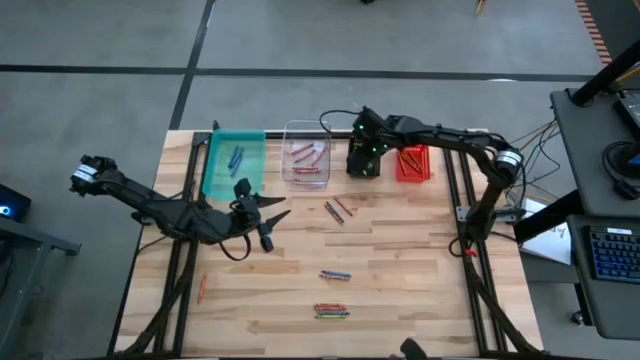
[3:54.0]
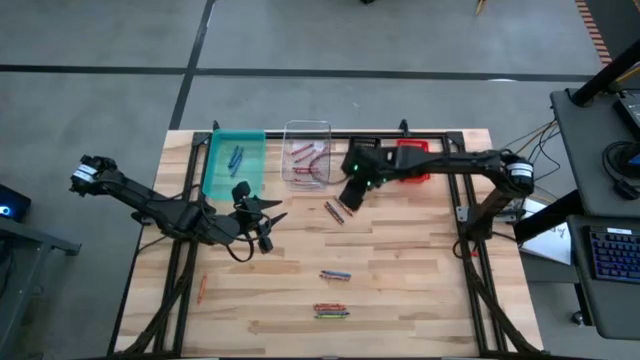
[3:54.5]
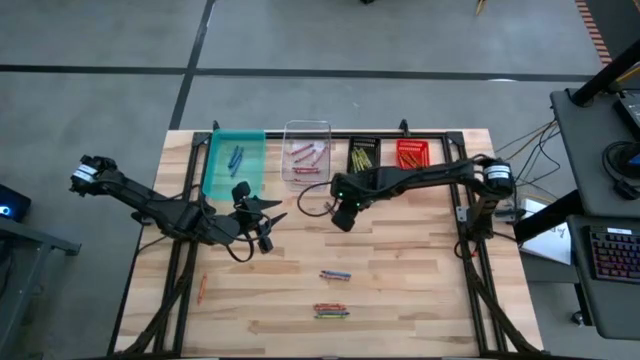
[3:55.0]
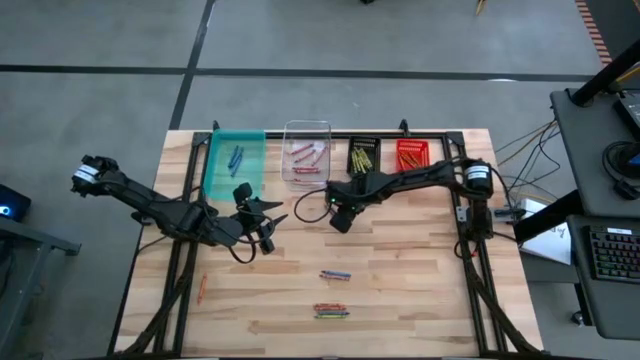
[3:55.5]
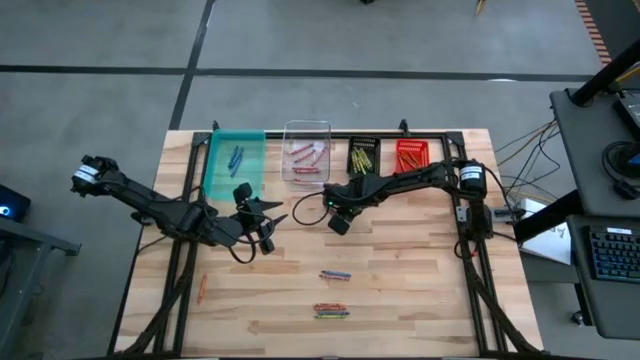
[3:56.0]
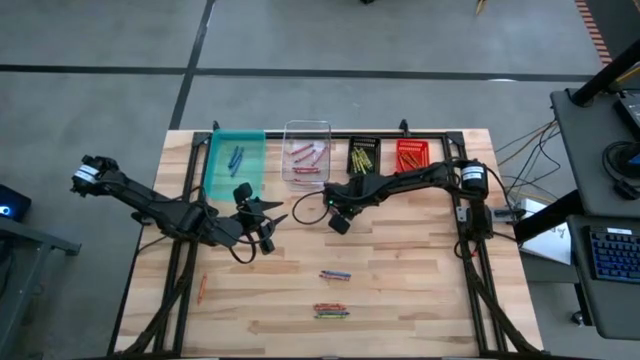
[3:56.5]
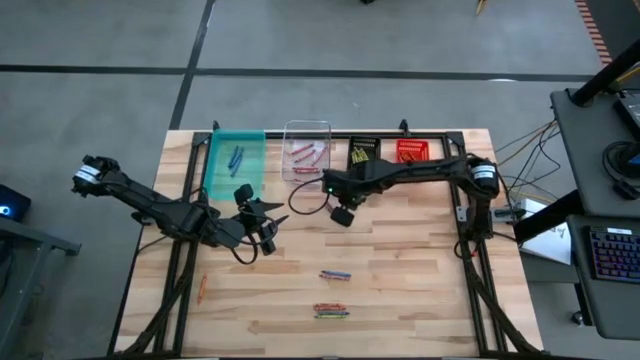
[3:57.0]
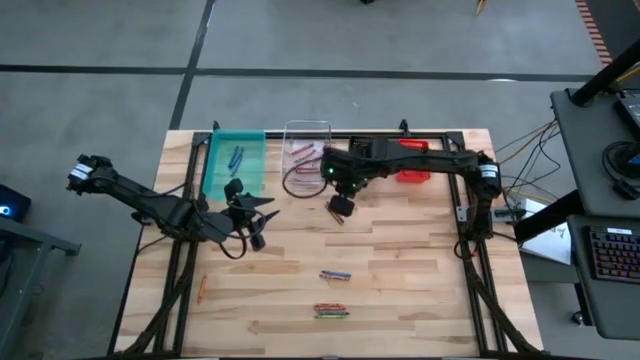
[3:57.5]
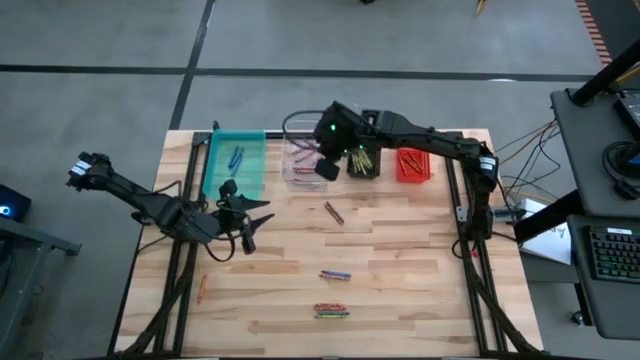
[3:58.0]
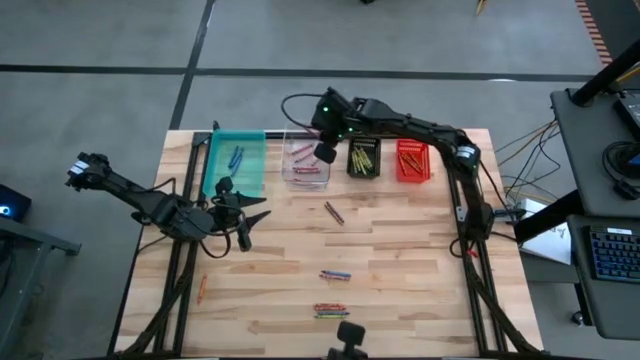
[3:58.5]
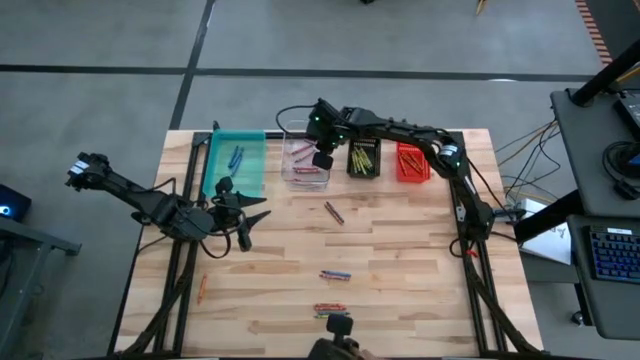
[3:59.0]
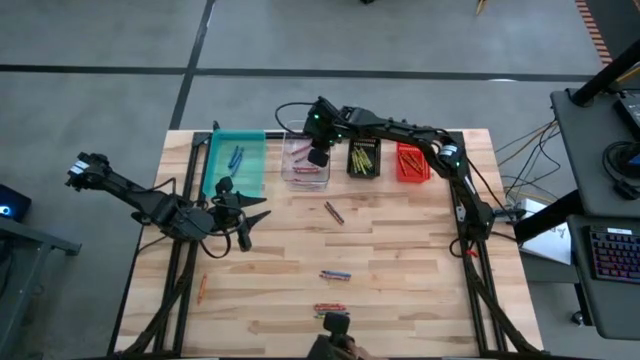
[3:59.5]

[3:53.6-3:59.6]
Task: Sort crayons
Put the red crayon into the transparent bin

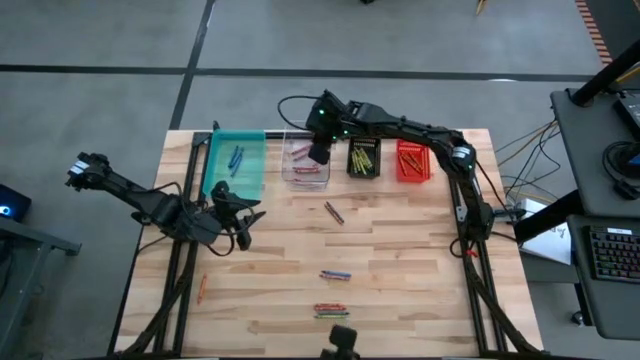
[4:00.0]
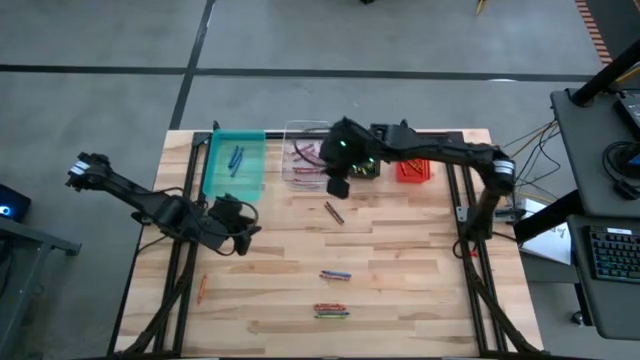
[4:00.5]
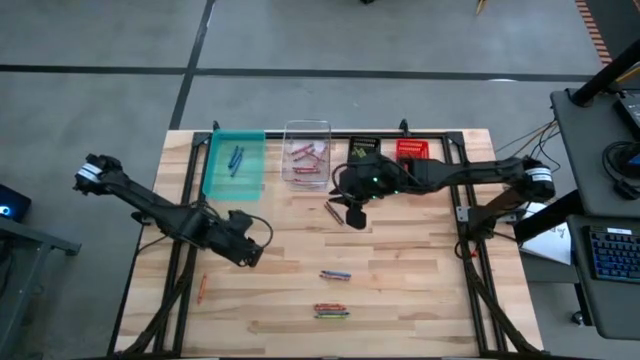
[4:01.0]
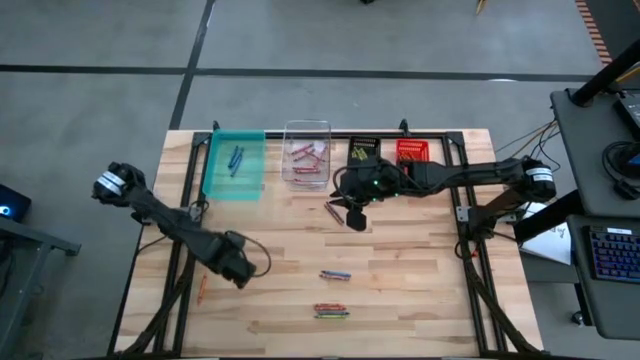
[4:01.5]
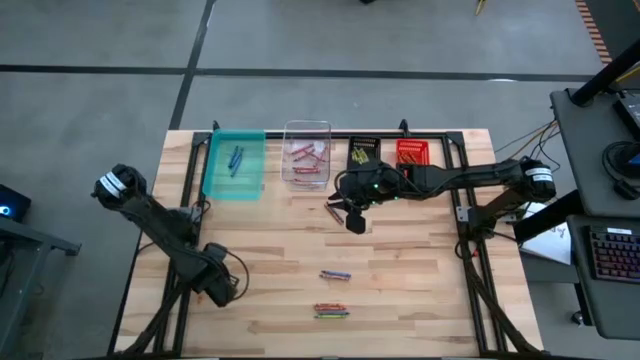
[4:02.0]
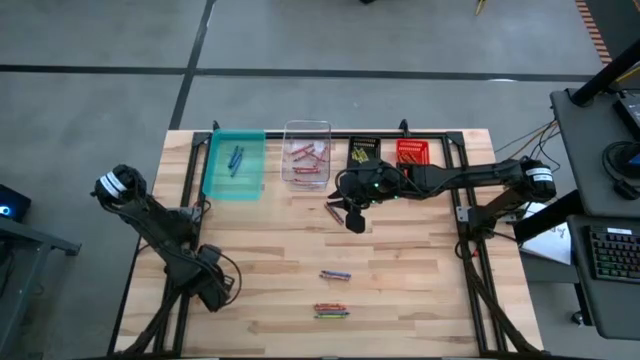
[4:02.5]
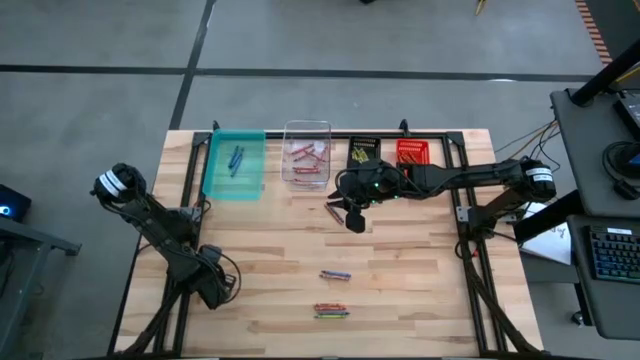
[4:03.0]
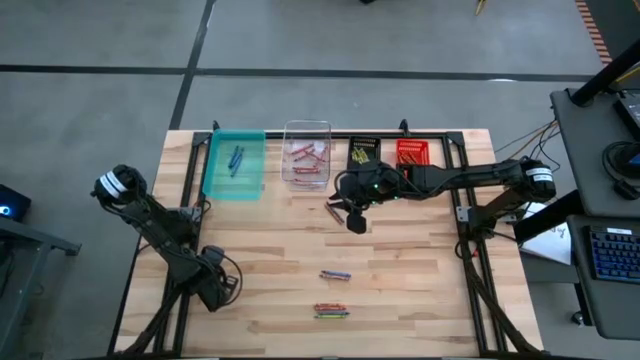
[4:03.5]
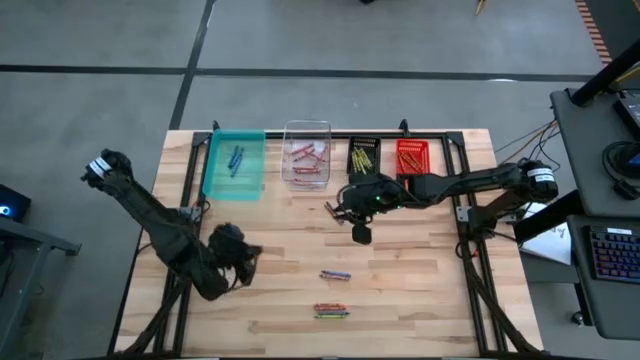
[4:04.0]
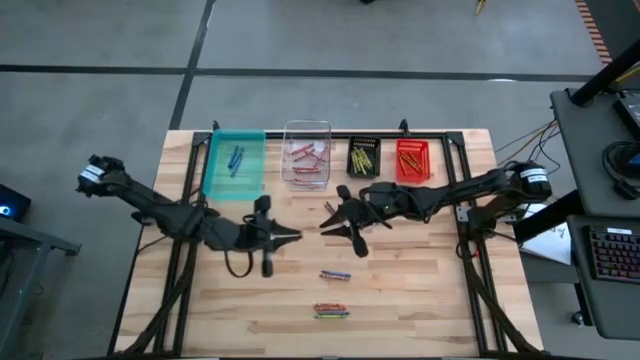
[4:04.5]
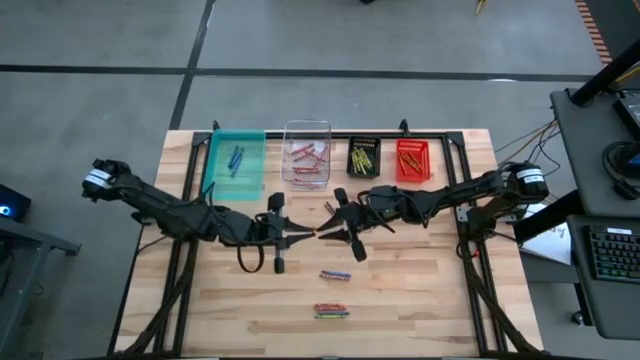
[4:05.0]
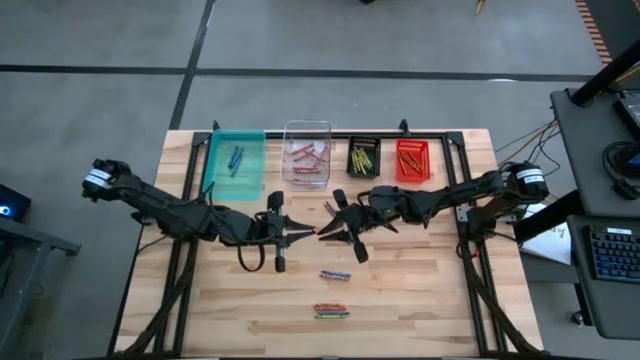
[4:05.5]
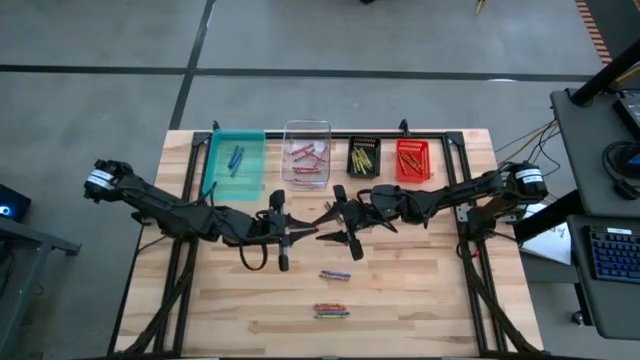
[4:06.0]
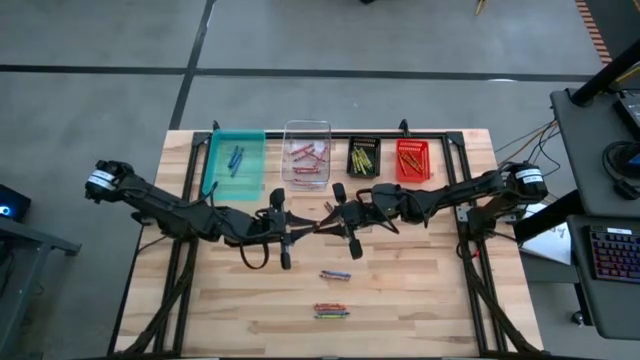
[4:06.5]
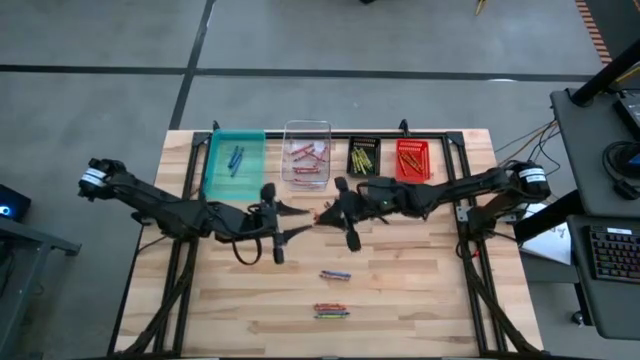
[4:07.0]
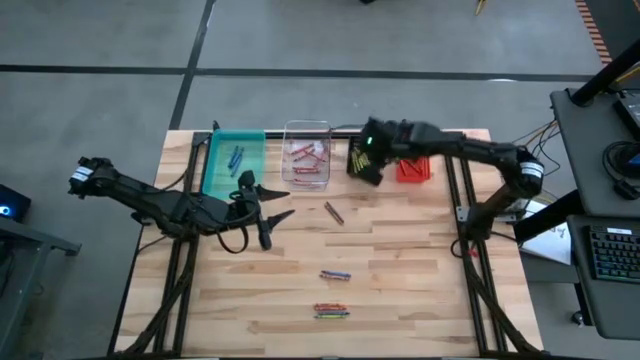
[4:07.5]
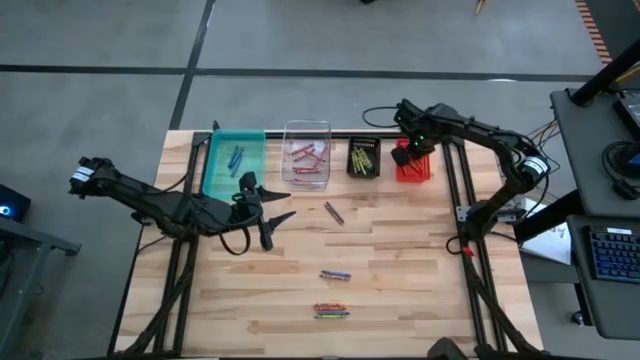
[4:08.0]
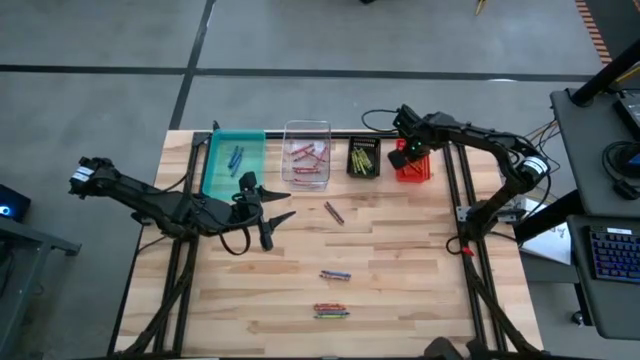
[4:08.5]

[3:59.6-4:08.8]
Put the orange crayon into the orange bin

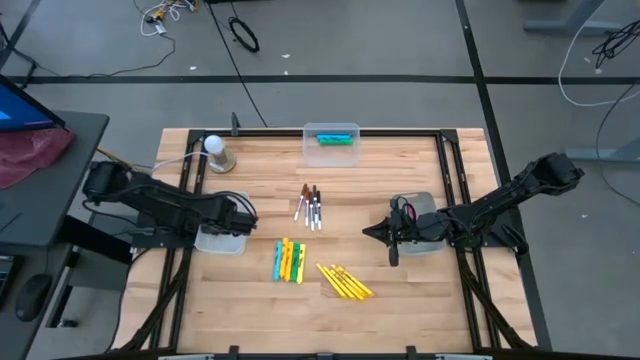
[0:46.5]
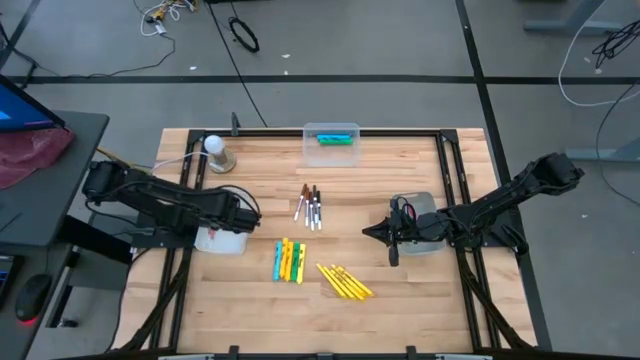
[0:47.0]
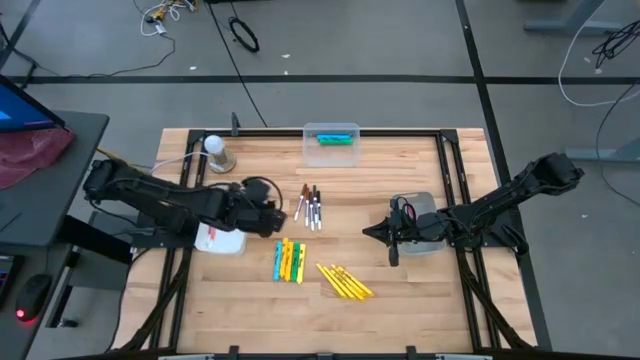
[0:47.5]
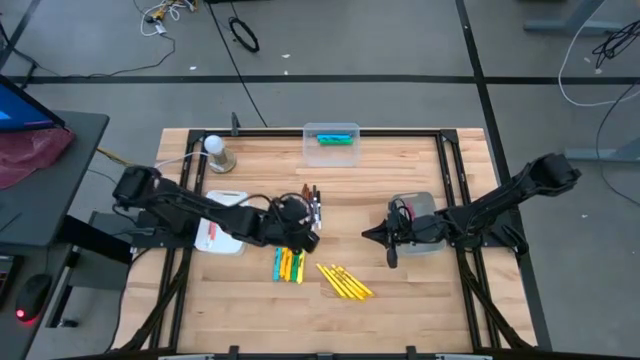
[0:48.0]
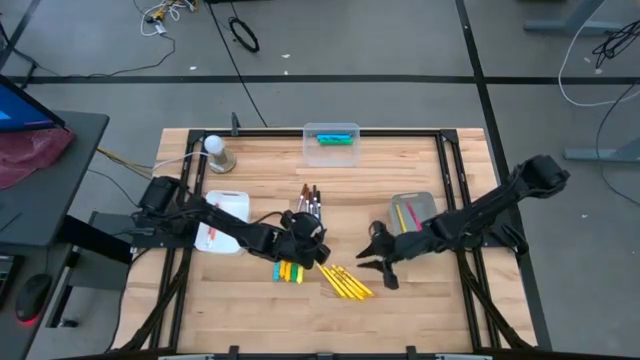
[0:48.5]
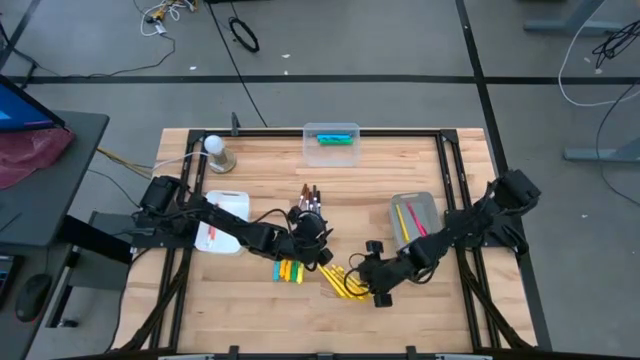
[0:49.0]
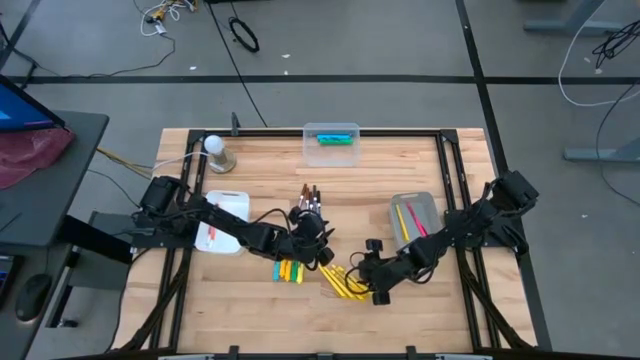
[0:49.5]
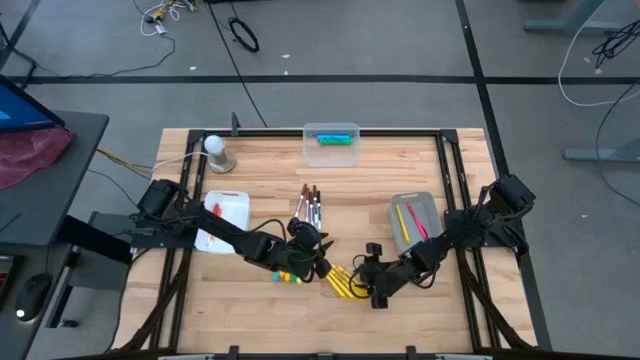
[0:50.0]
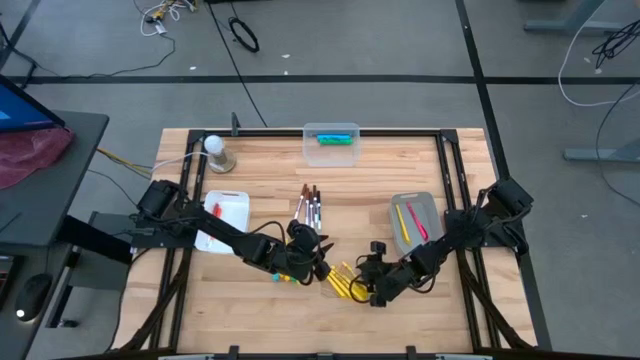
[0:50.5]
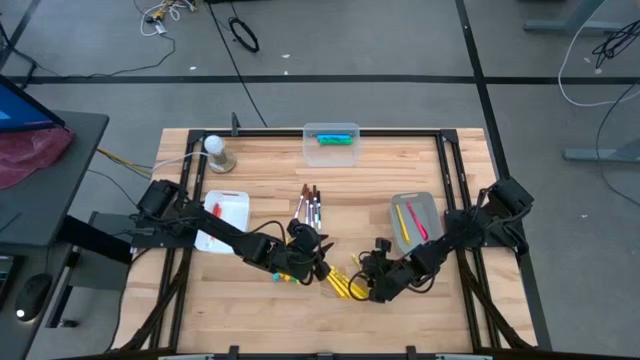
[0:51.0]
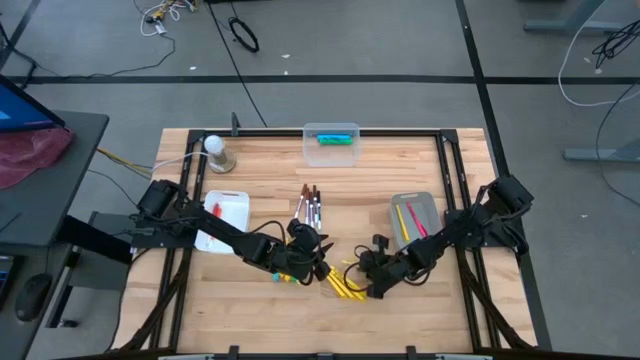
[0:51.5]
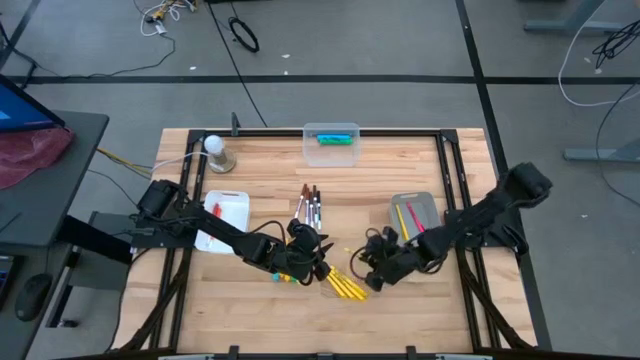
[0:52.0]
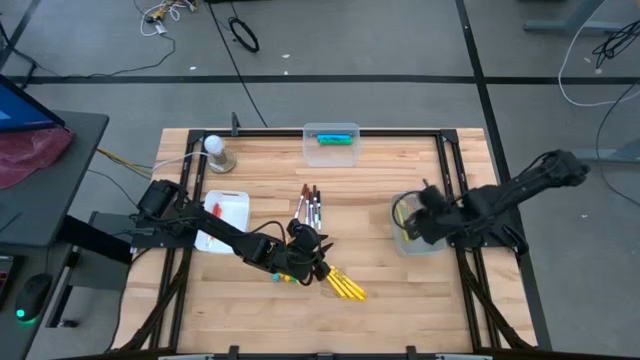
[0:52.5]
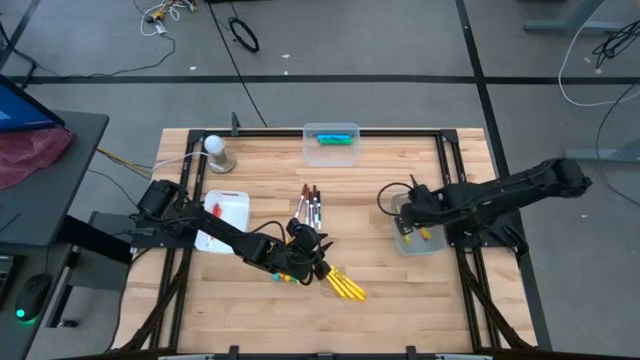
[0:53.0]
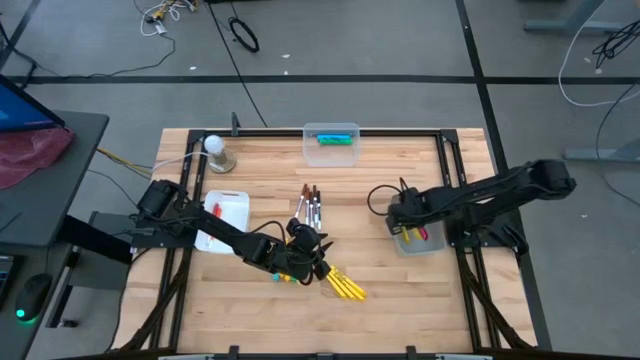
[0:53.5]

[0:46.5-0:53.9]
Task: Pick & Place Markers
Put the yellow pen into the gray bin
